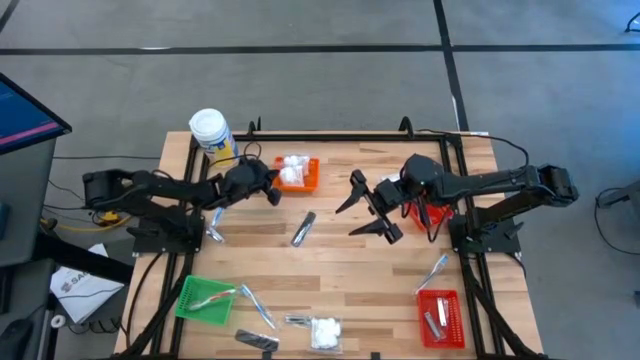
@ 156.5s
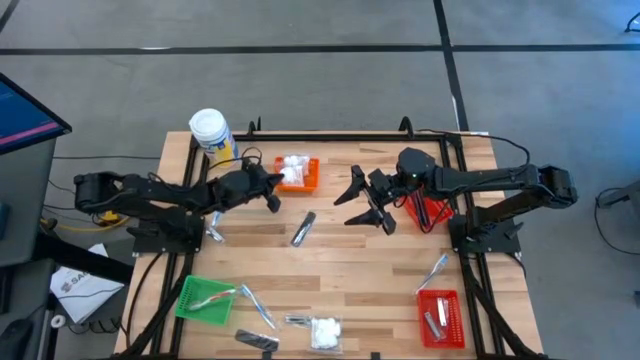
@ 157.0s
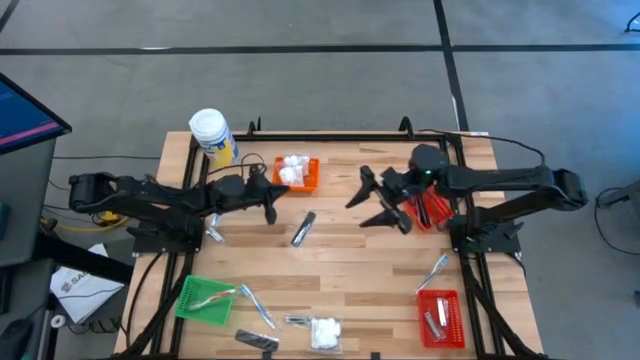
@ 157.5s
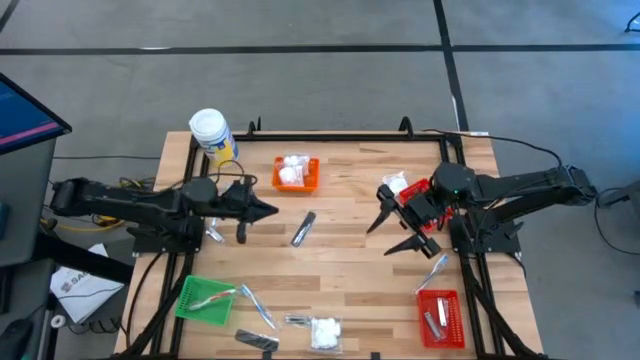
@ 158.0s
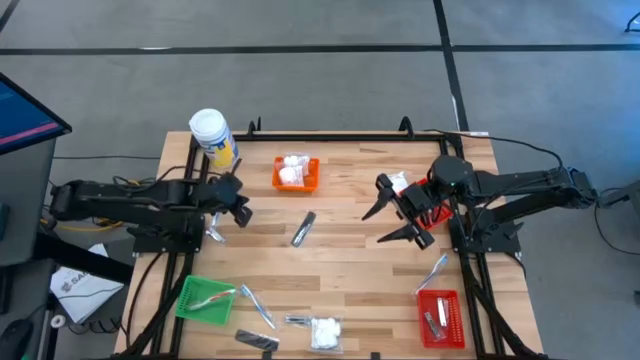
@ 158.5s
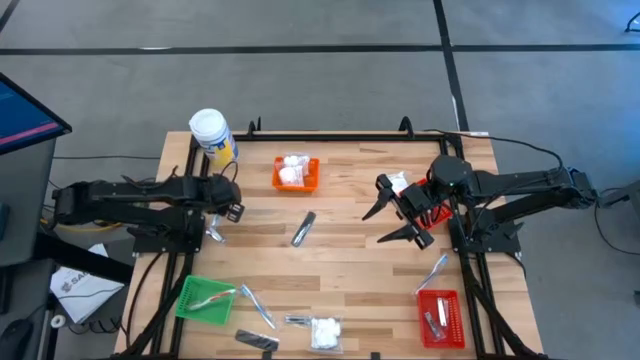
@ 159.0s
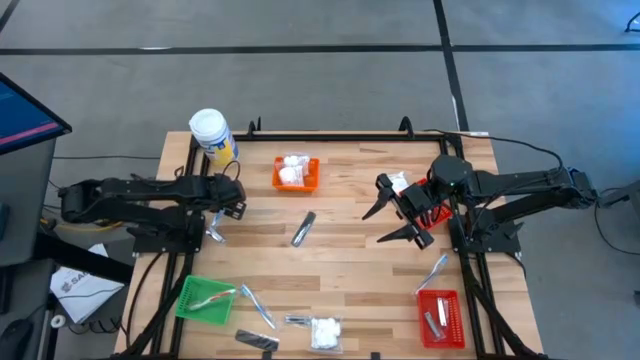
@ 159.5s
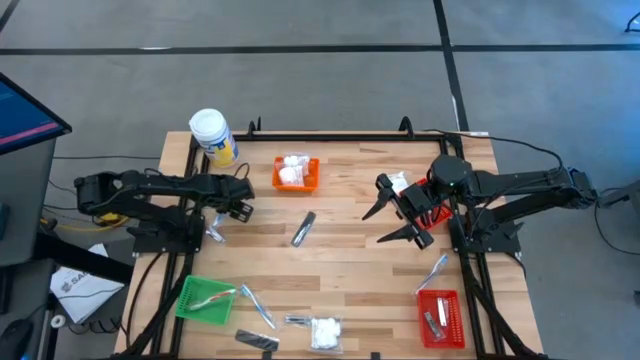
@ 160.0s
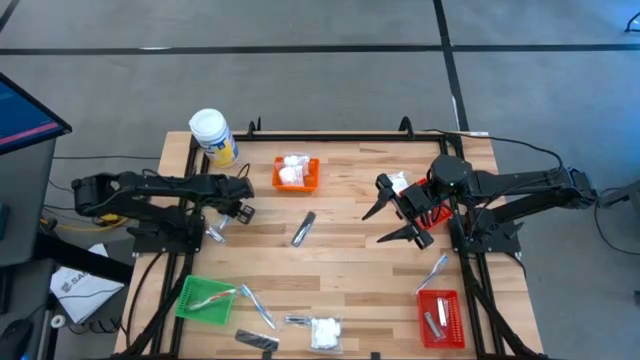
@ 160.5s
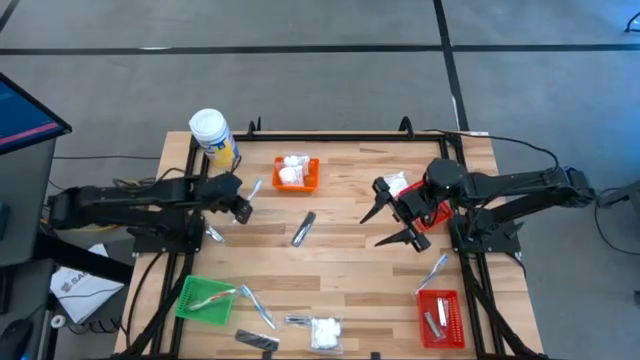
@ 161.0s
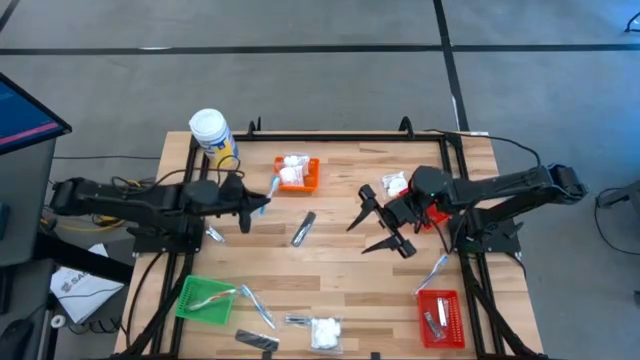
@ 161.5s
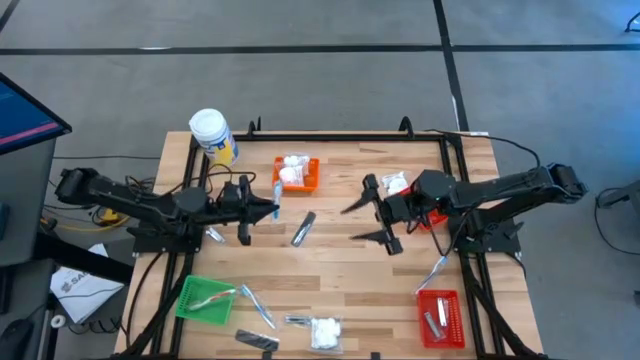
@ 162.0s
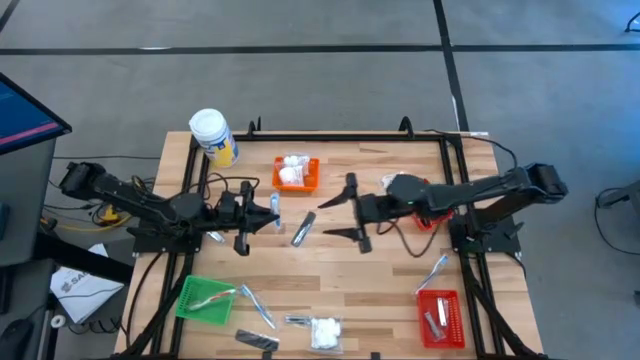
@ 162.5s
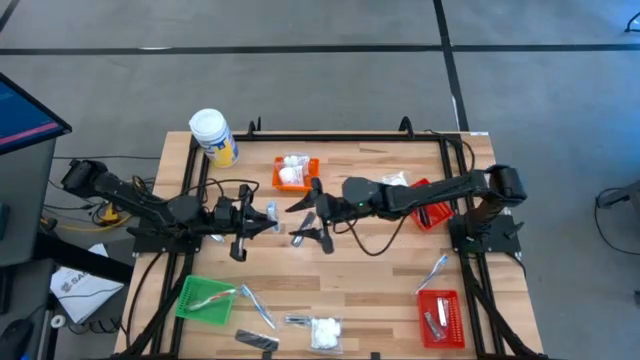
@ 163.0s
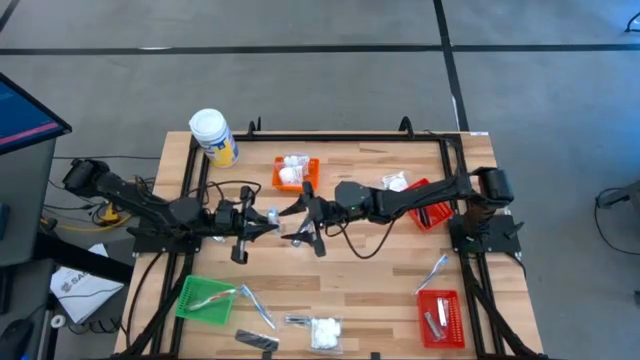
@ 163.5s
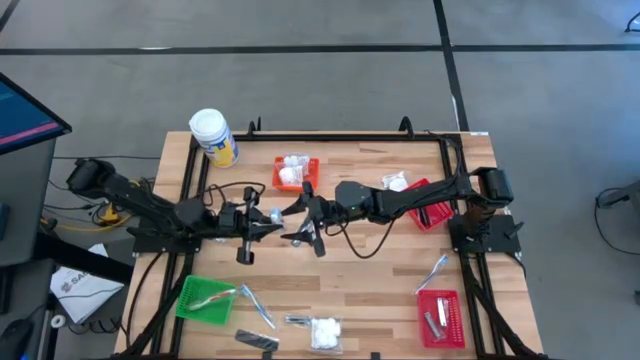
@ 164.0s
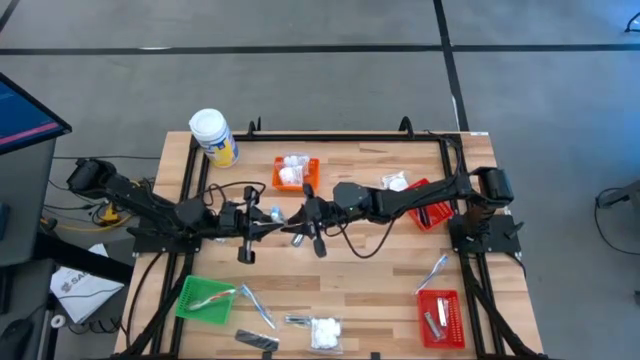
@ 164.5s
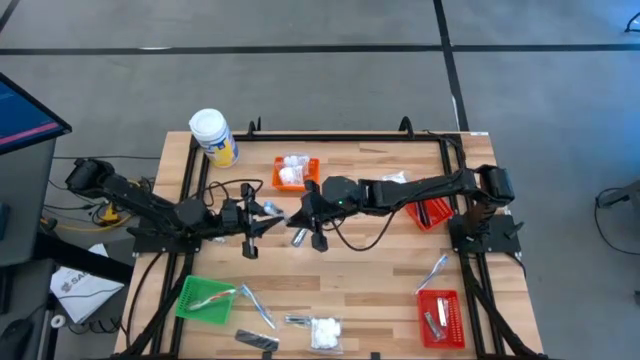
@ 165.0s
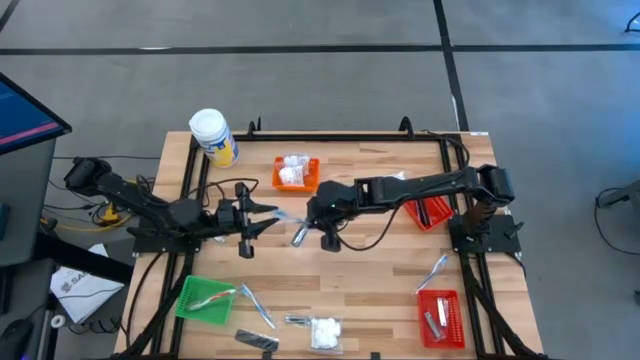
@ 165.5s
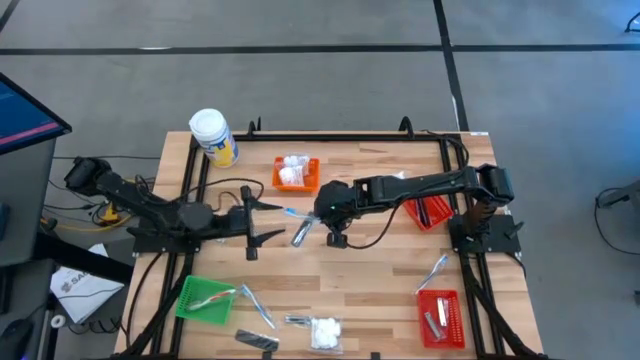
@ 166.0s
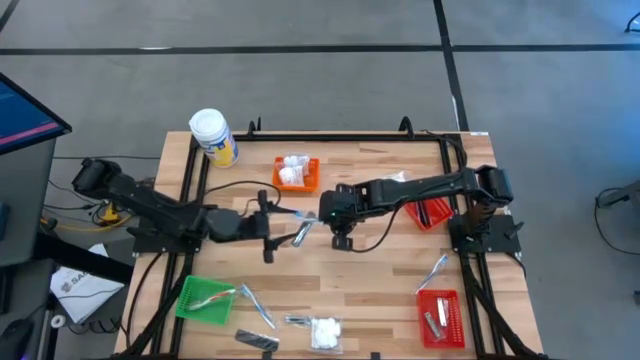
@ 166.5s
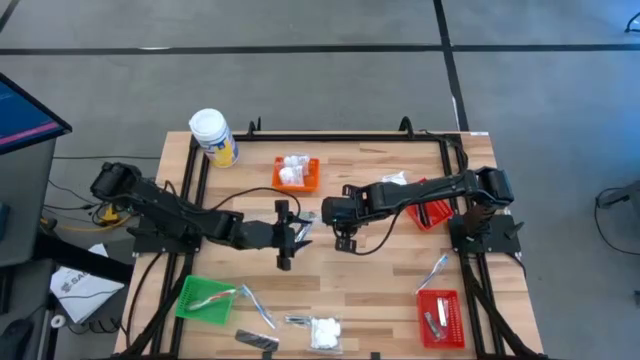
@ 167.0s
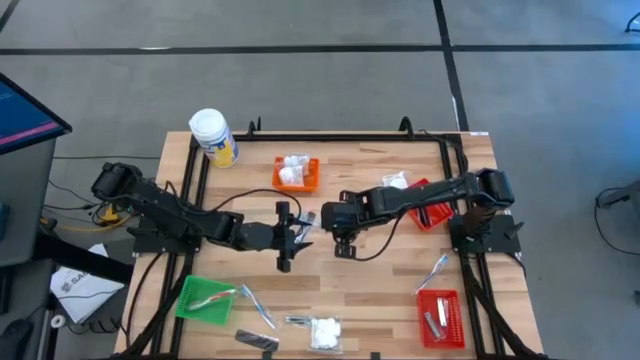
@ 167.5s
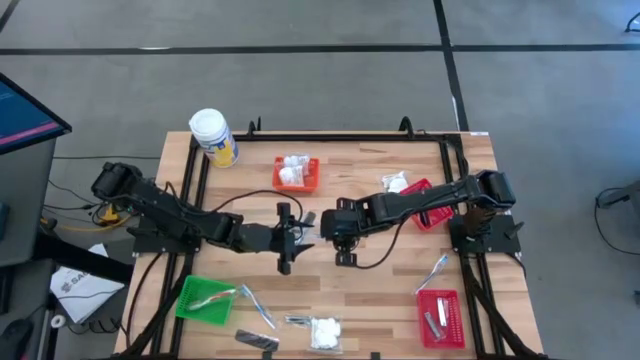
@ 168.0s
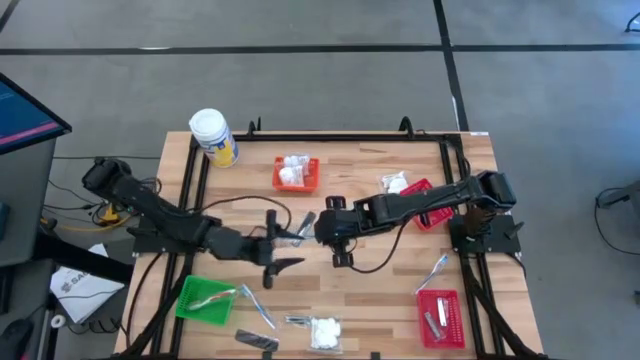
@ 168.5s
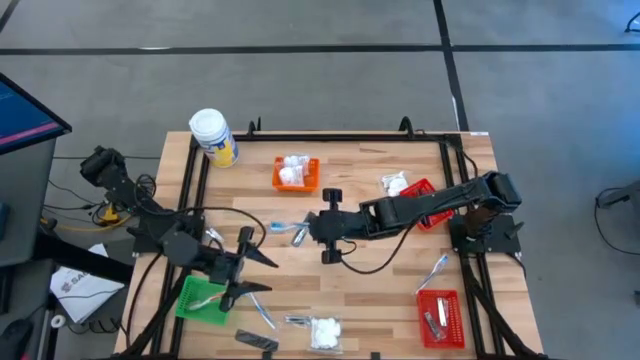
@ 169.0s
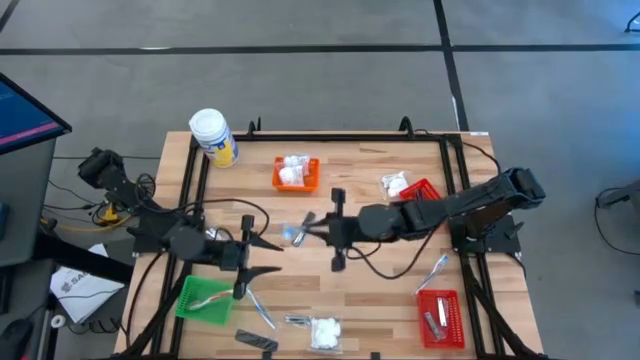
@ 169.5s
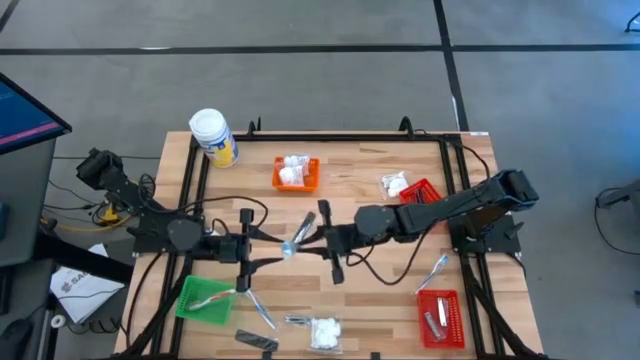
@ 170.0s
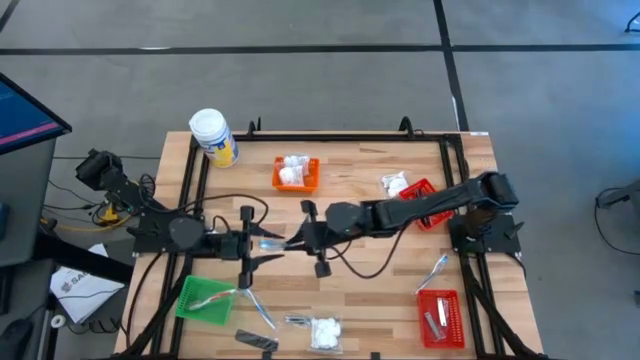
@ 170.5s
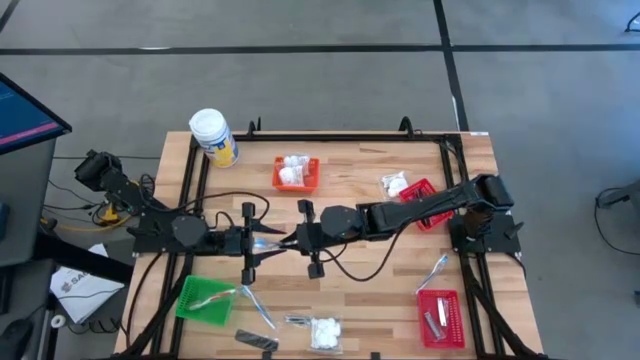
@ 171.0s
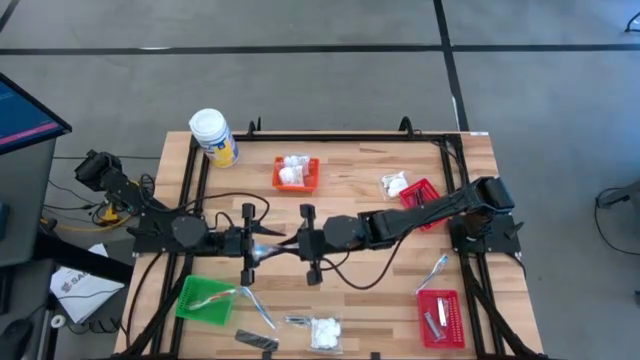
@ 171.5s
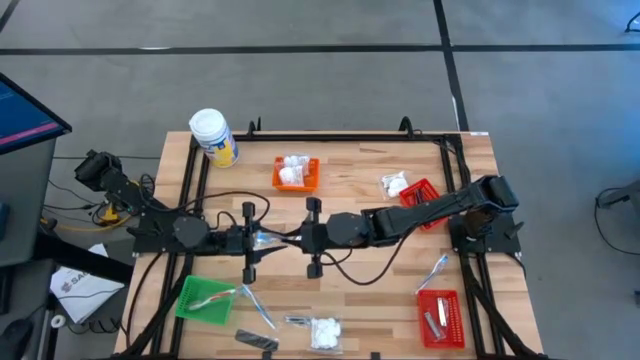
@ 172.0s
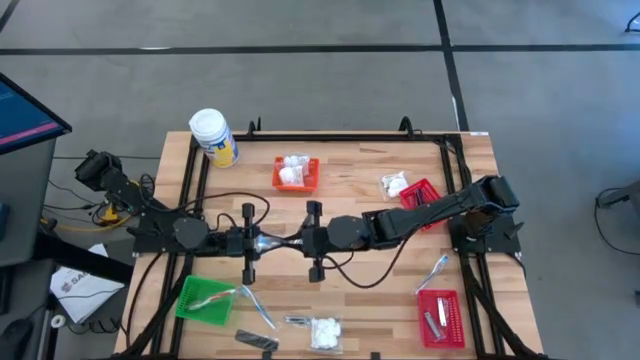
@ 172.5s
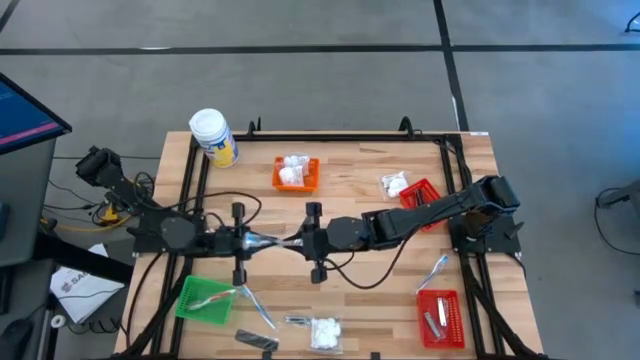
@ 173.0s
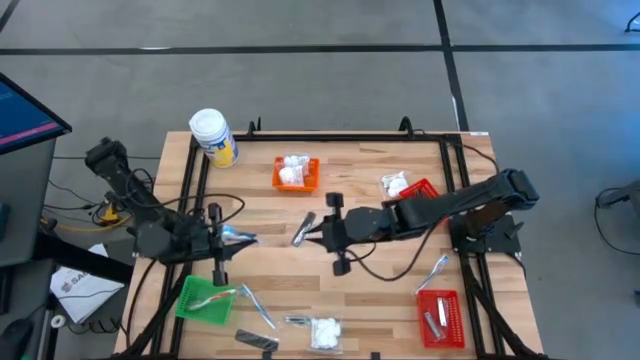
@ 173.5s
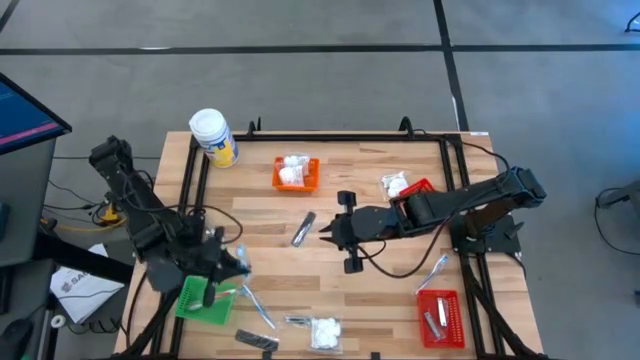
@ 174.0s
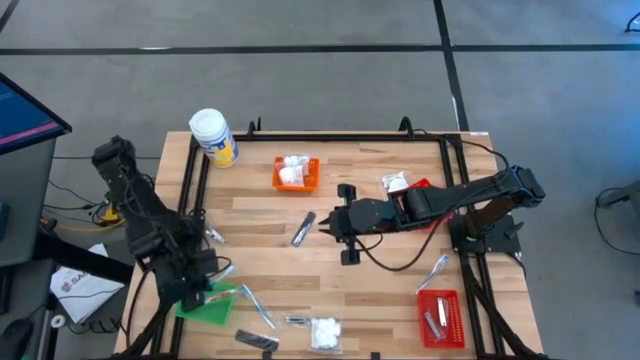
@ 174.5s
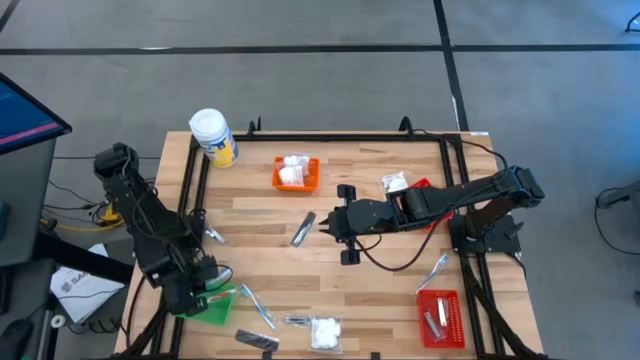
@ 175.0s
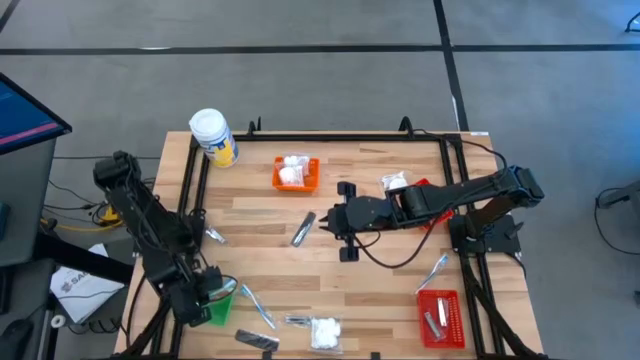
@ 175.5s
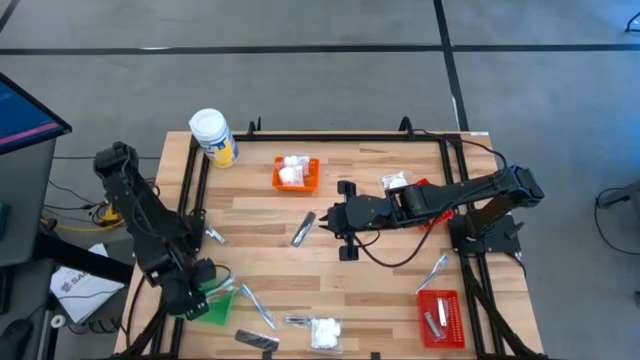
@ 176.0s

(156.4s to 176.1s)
Task: Pick & Place Travel size toiletries
Put the light blue toothbrush into the green basket

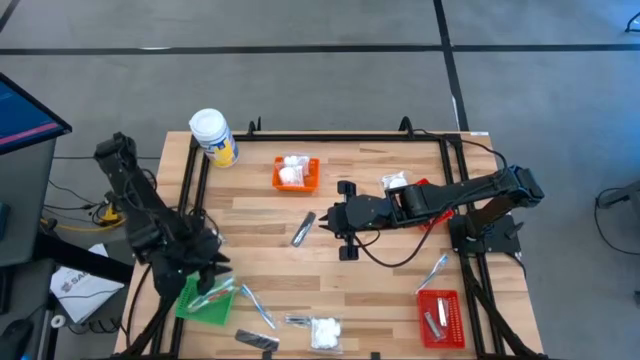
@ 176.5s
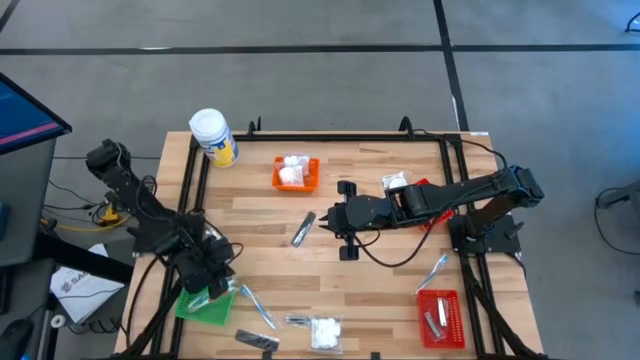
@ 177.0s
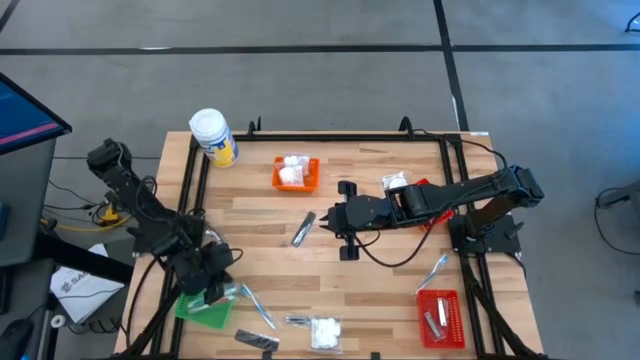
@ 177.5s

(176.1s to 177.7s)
Adjust the green basket
